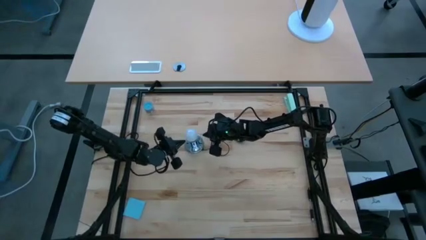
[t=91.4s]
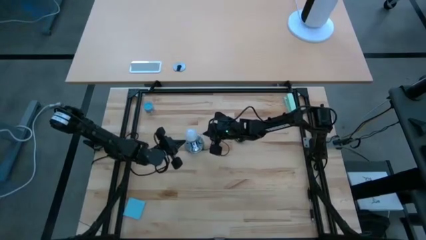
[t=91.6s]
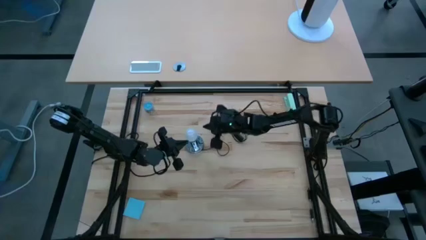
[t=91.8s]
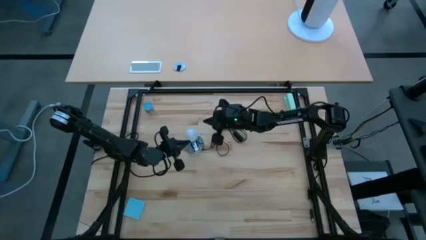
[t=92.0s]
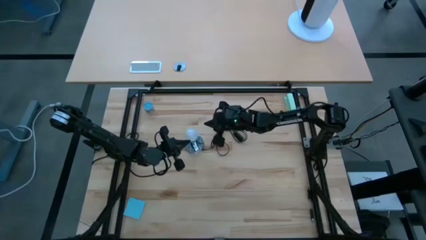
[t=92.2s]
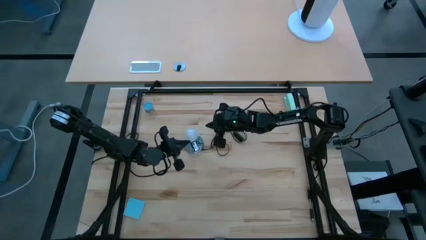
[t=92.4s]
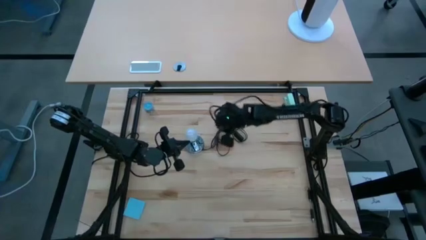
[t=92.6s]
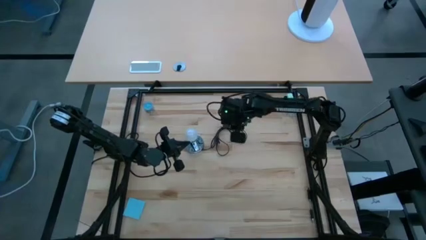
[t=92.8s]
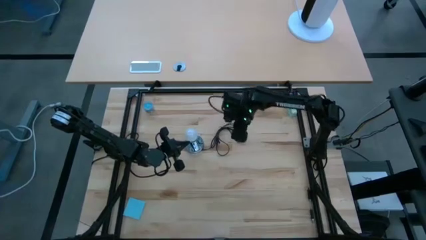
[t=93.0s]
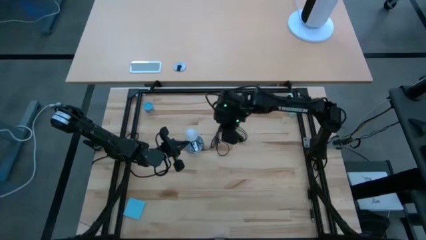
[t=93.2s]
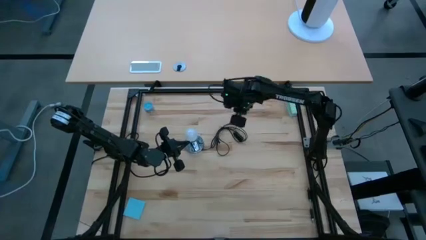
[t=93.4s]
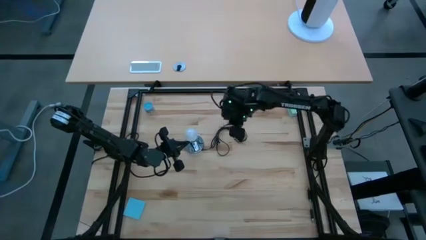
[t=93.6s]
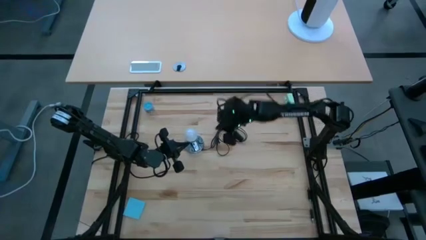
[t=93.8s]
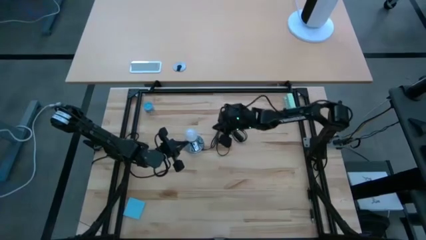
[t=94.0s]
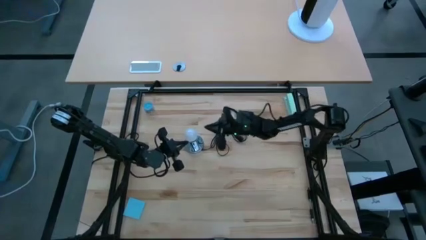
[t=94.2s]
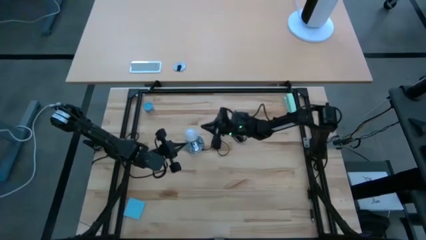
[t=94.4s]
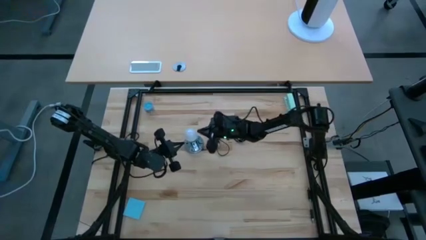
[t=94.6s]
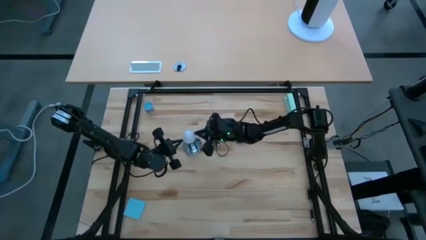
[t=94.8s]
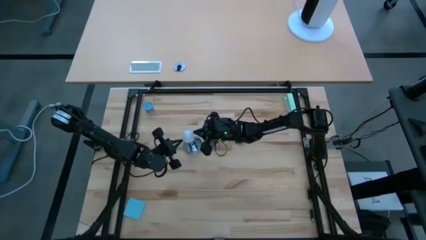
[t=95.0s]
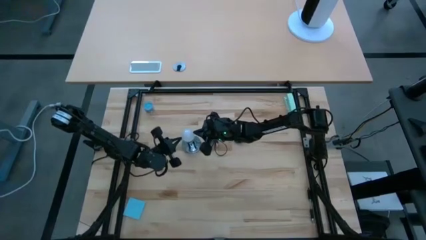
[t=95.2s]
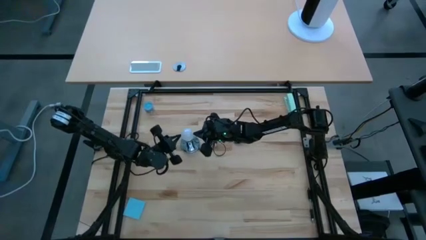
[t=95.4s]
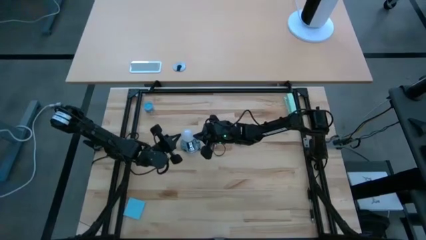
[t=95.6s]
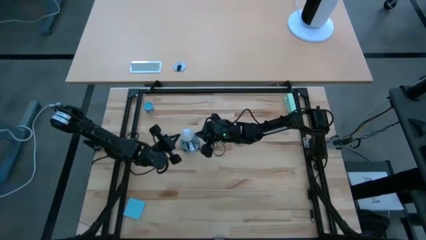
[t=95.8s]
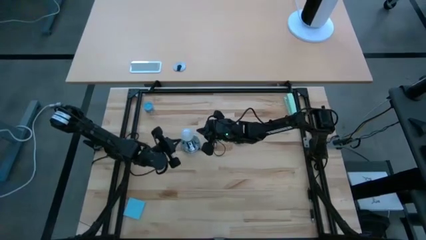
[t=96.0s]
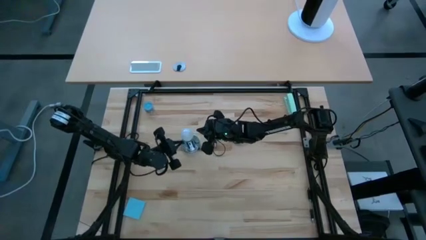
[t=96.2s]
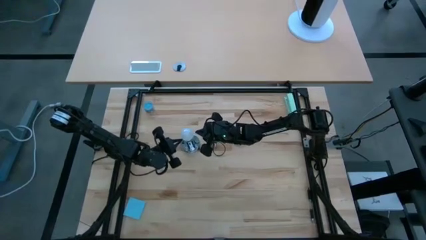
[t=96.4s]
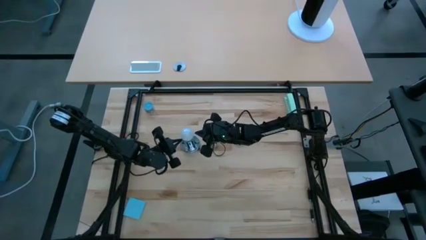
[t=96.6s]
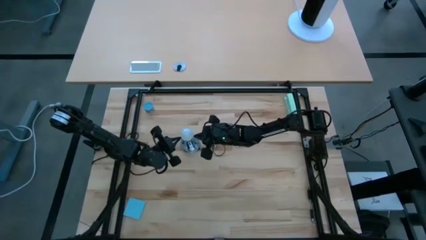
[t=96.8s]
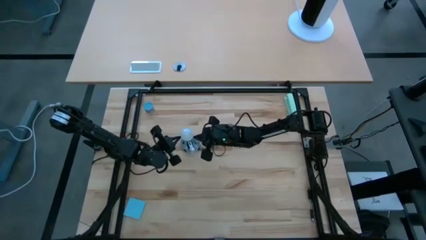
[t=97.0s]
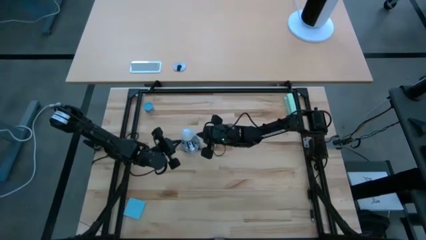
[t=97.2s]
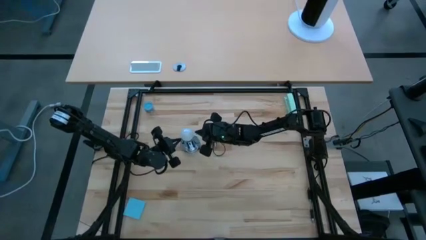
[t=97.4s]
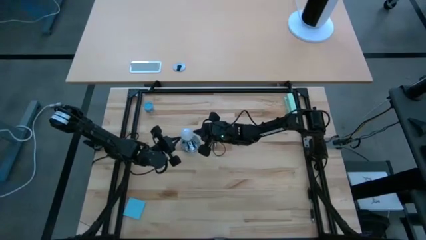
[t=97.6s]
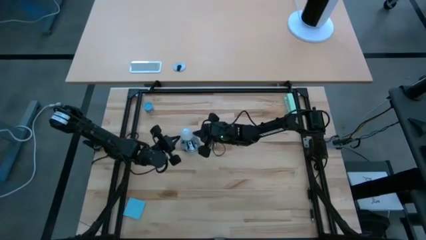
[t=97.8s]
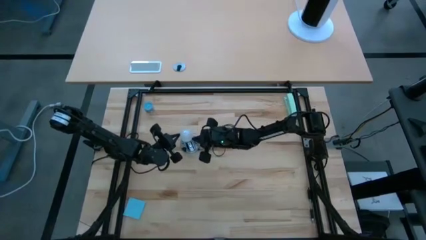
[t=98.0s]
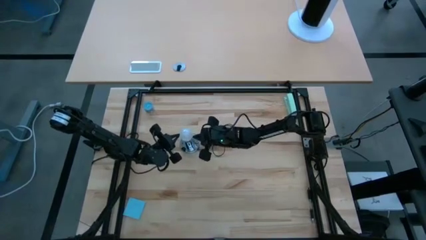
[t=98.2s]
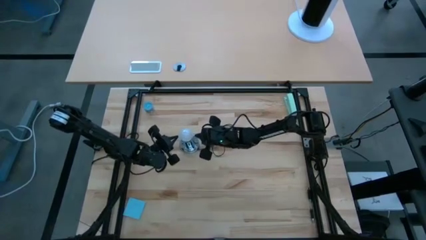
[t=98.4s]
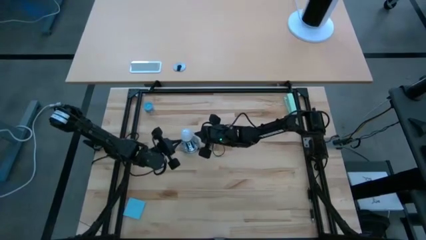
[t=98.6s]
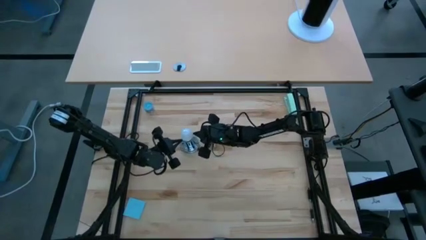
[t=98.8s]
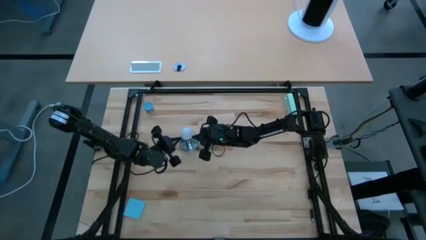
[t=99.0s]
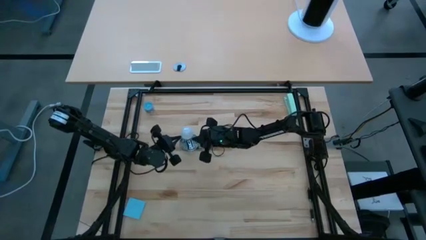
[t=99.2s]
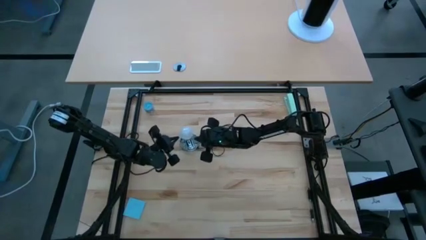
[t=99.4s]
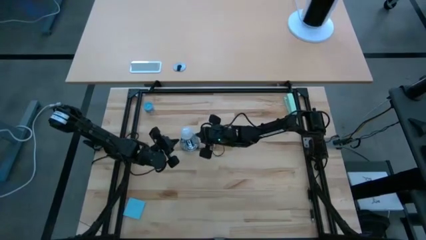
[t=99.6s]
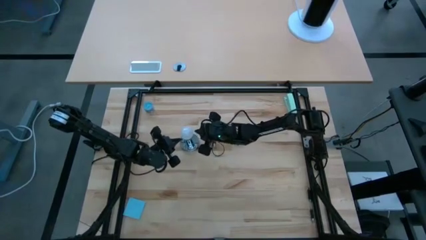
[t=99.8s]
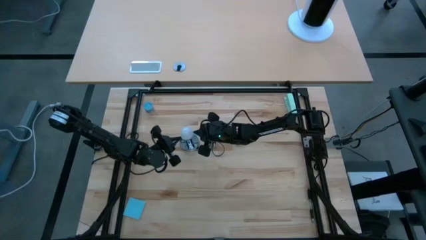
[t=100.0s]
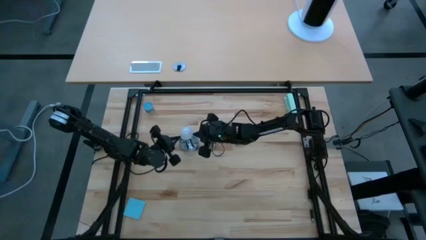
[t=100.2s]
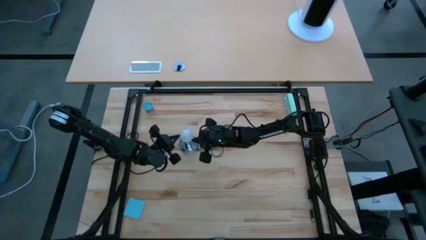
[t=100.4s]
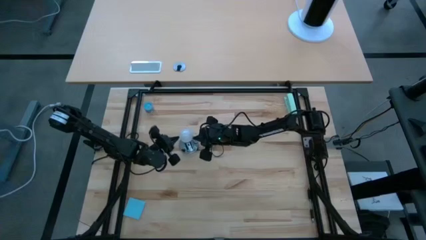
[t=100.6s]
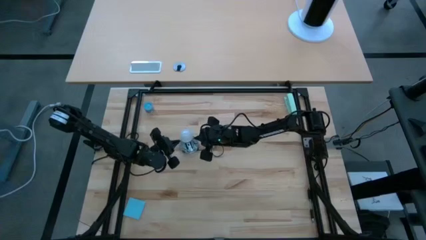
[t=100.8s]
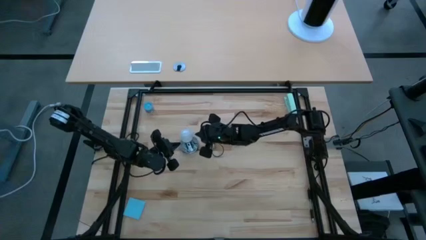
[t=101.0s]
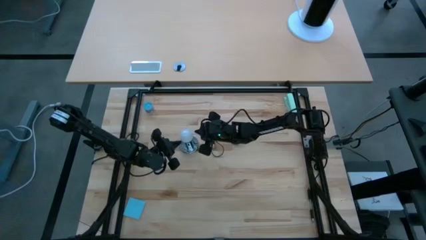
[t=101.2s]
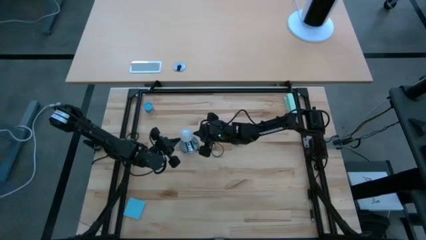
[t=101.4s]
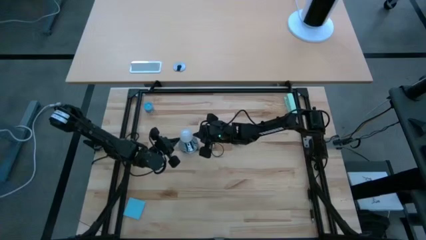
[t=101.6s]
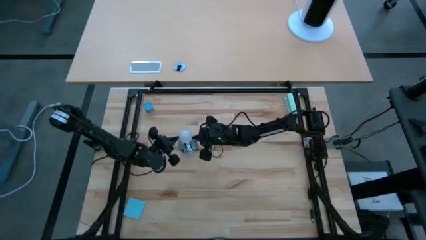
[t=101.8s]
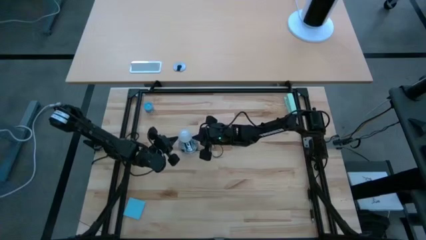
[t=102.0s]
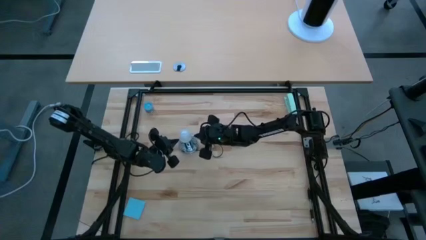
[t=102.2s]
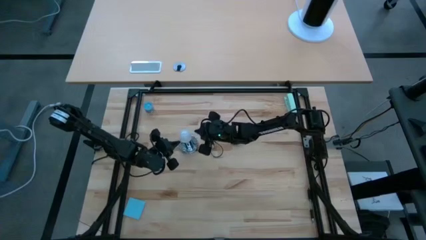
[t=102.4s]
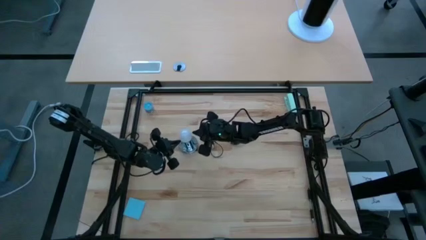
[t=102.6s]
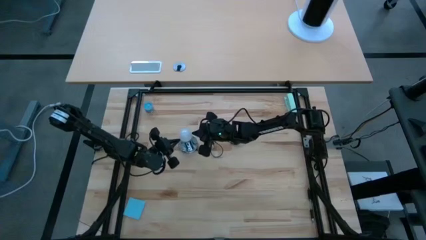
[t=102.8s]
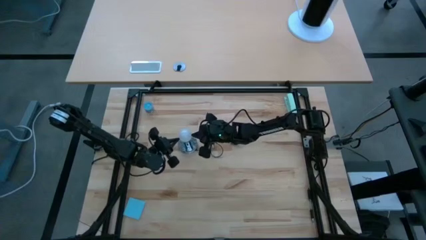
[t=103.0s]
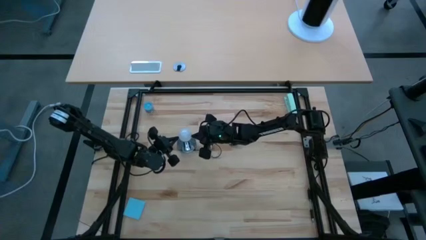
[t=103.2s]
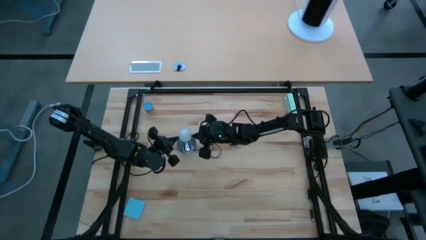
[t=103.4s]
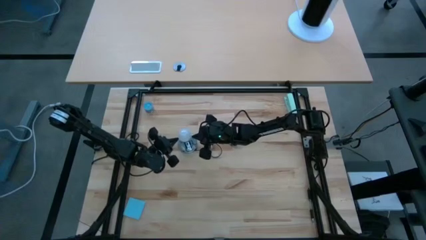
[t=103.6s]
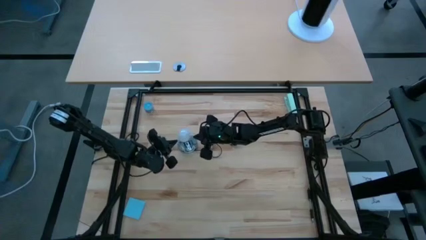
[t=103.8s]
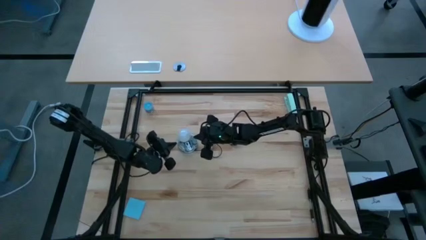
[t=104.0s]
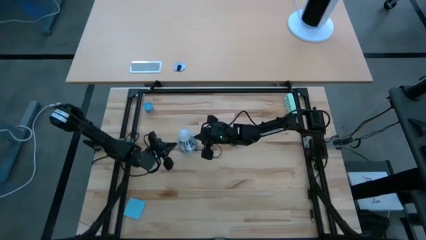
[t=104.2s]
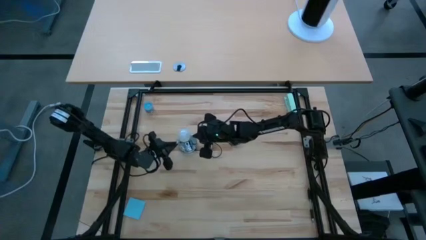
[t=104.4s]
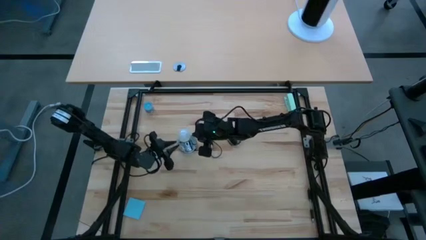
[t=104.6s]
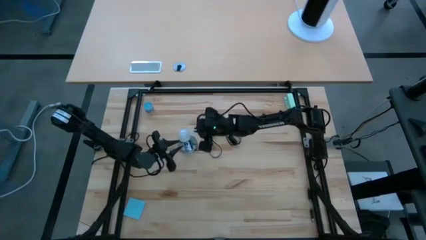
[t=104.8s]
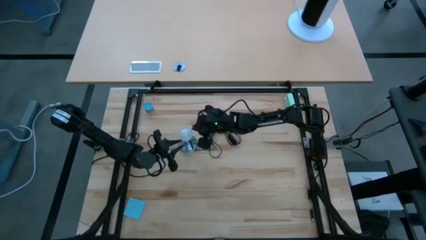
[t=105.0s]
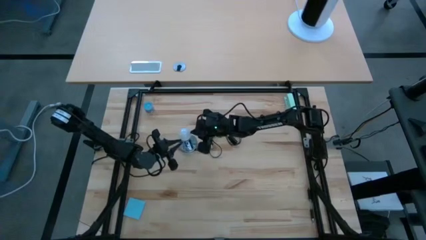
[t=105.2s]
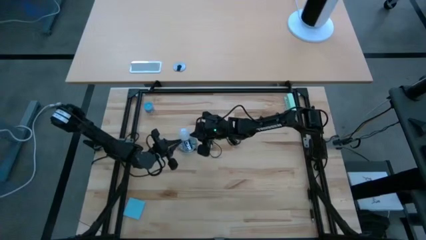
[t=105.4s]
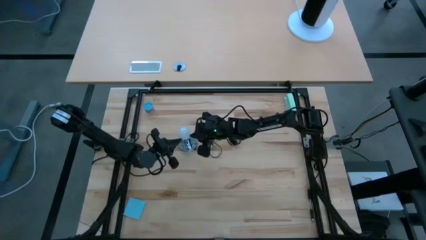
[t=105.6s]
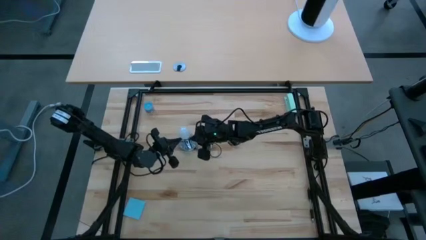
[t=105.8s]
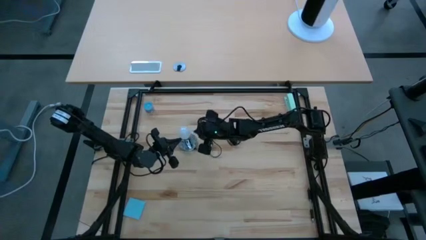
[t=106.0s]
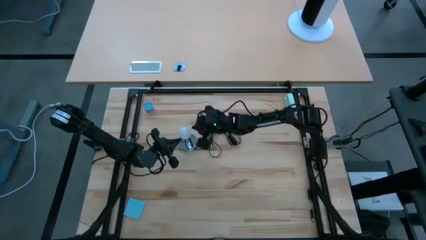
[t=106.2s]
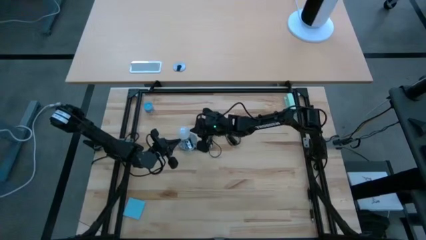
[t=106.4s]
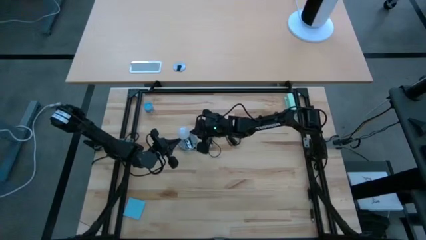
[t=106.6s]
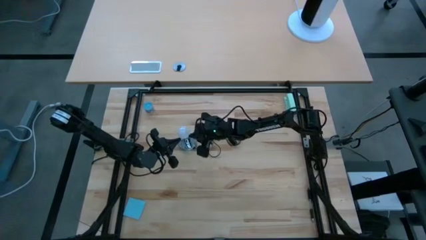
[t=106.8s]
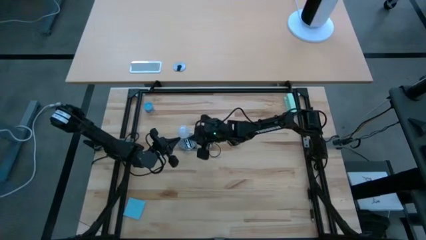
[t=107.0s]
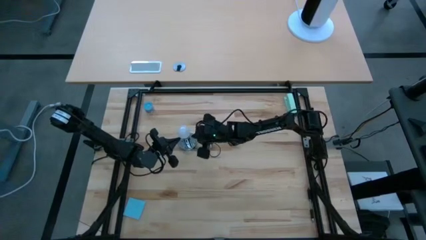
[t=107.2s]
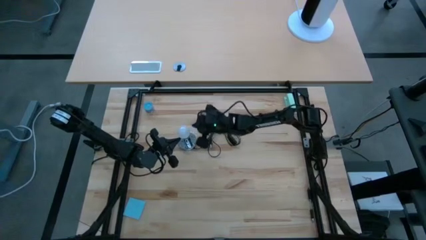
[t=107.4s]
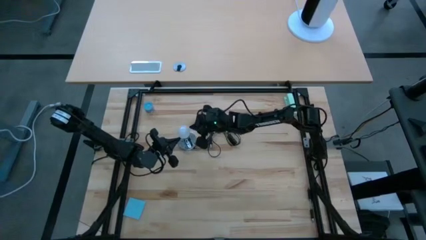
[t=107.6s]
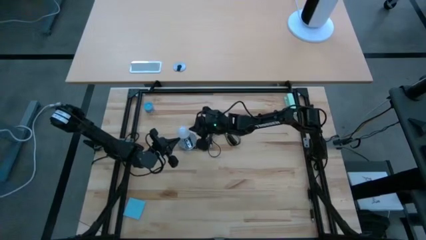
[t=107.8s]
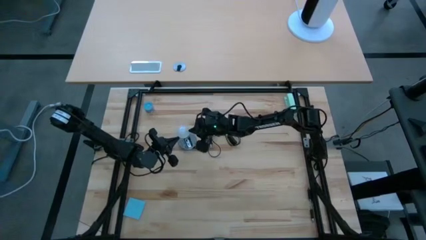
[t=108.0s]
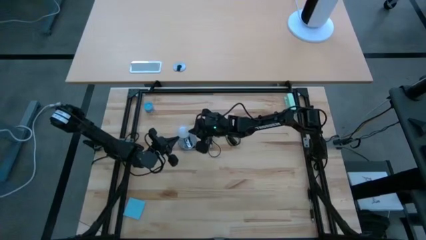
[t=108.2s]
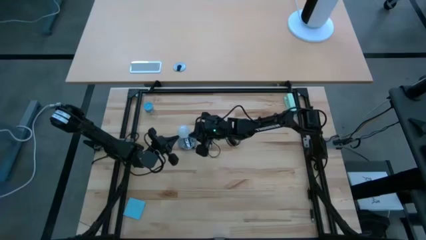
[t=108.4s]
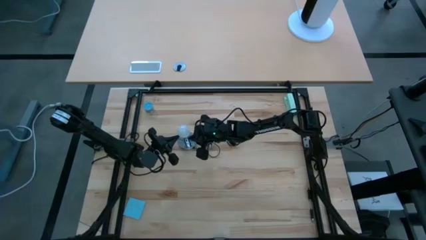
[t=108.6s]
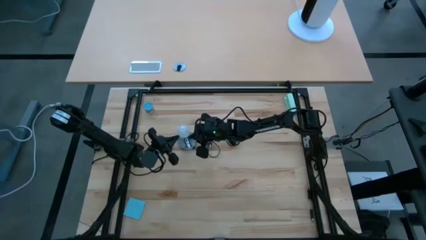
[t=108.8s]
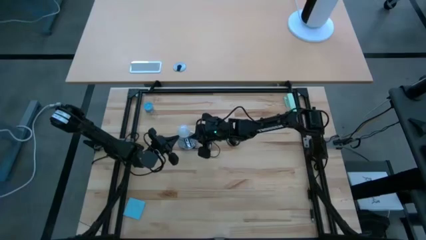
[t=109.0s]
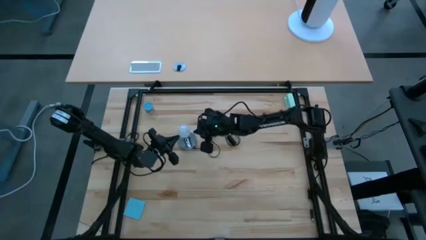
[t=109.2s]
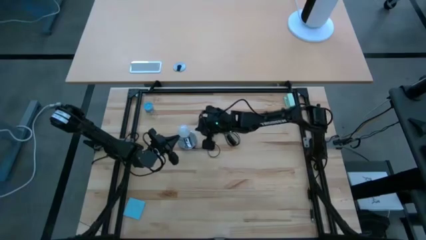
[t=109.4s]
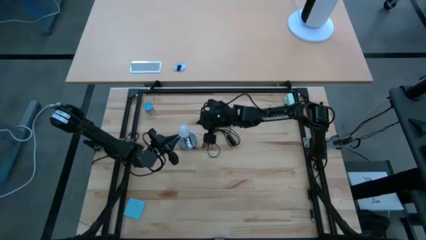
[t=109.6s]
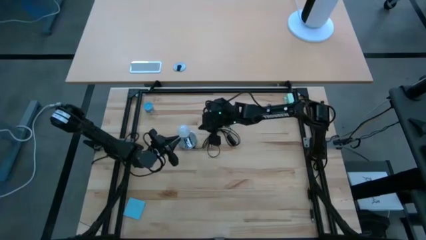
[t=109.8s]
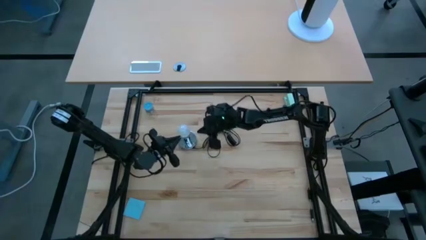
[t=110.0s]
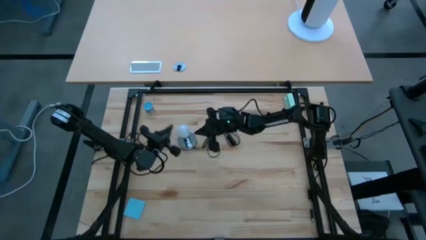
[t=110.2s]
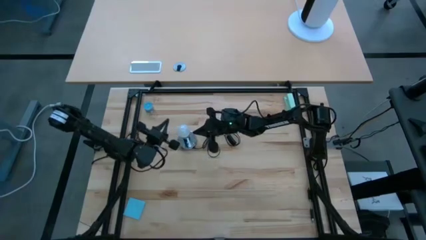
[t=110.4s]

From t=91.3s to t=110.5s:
Task: Screw lightbulb
Insert the lightbulb into the lamp
